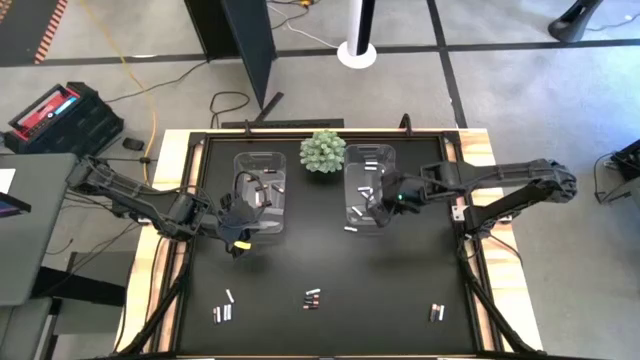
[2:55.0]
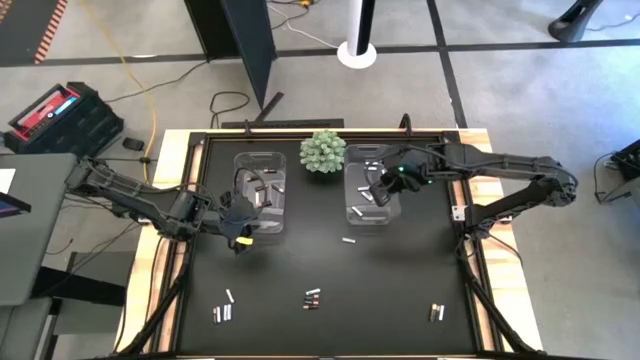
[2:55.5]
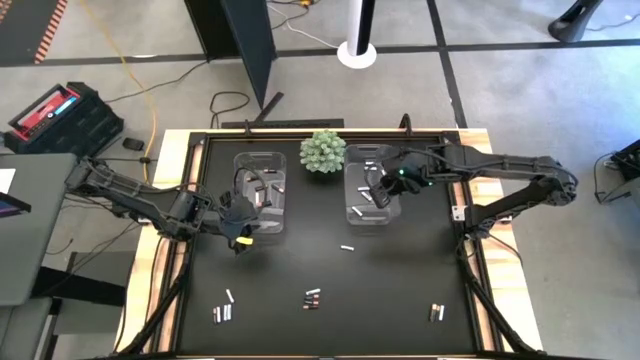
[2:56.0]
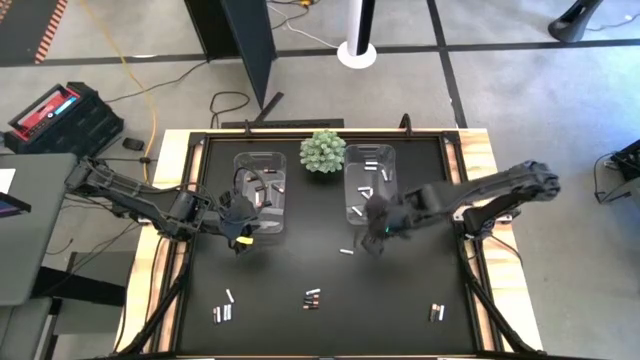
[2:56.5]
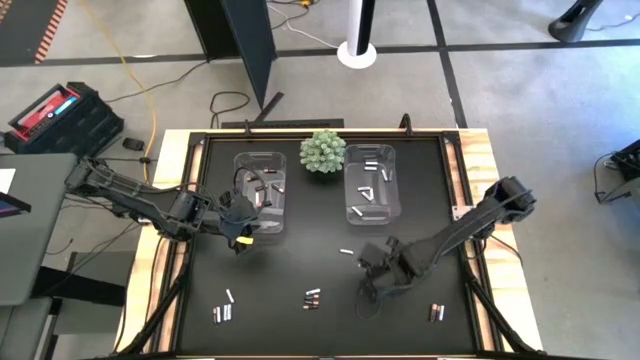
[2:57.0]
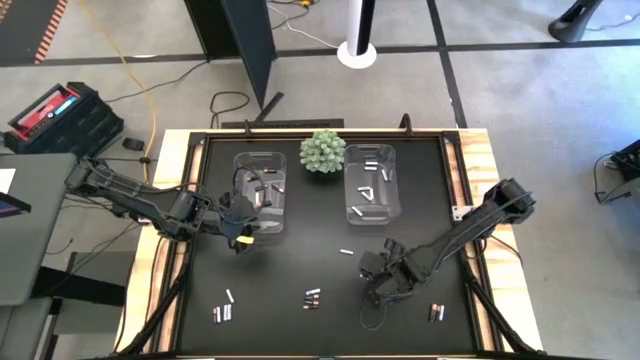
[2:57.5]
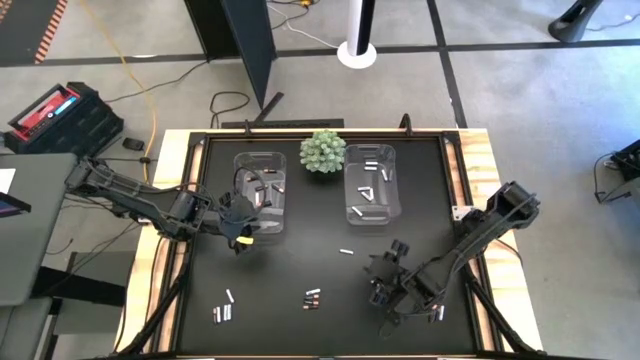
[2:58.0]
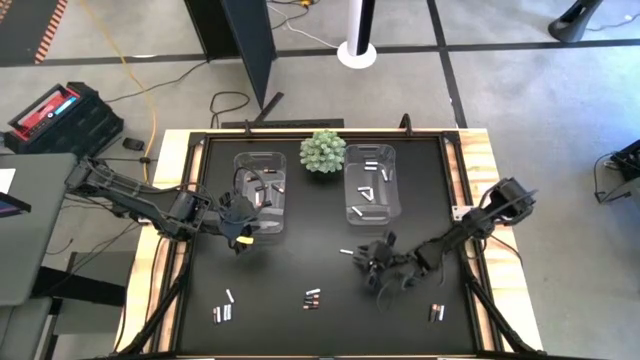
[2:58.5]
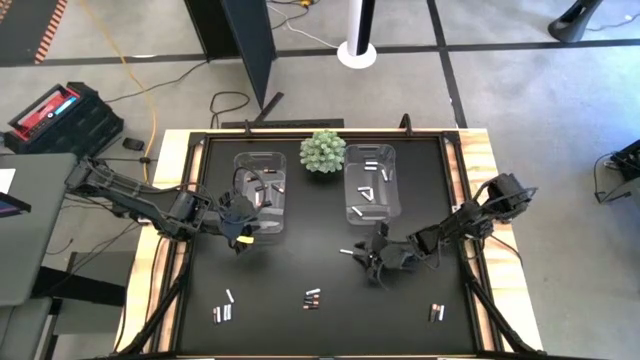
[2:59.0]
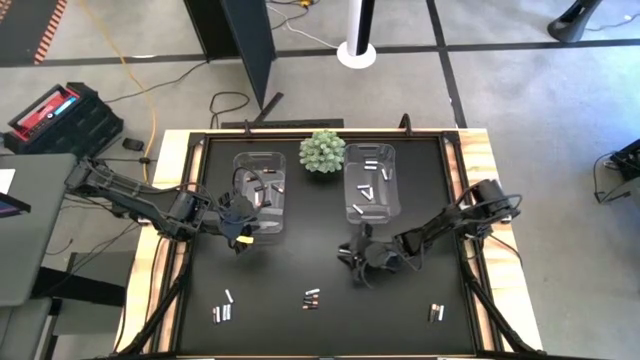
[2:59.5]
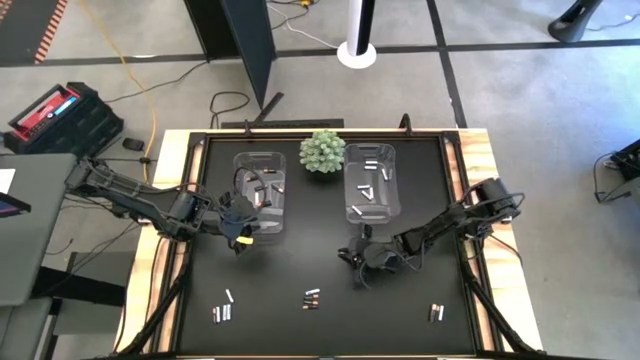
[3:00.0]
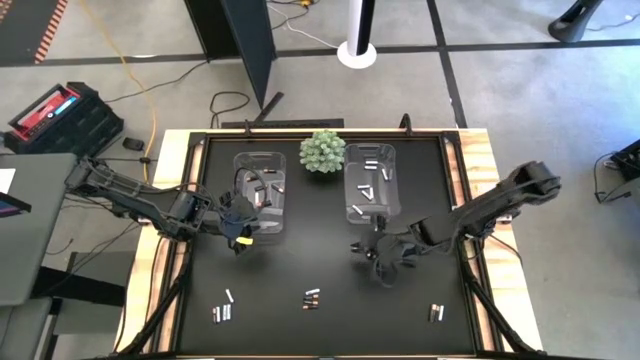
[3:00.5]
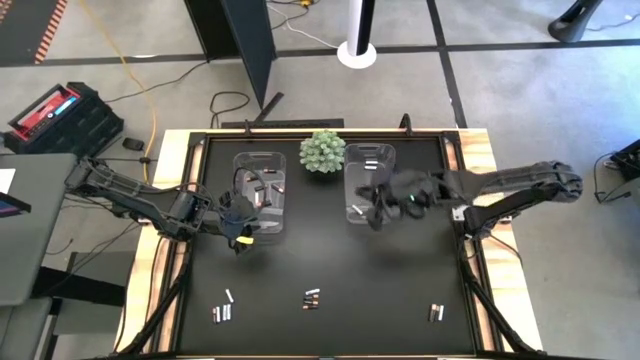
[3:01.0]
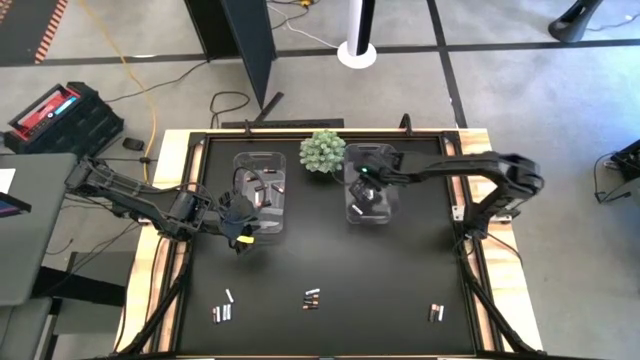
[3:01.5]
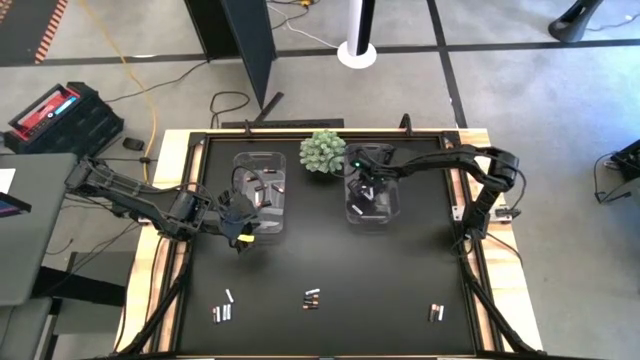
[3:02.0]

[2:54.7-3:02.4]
Task: Sort batteries
Put the white-blue battery into the right transparent bin

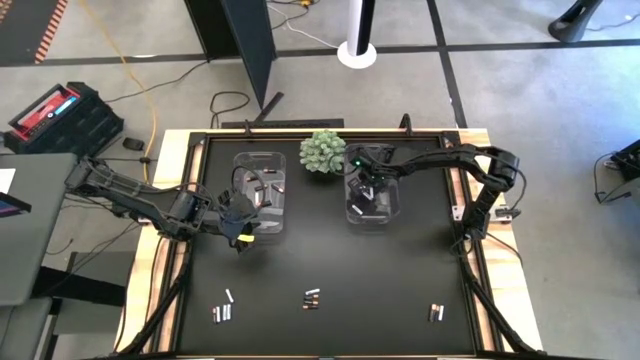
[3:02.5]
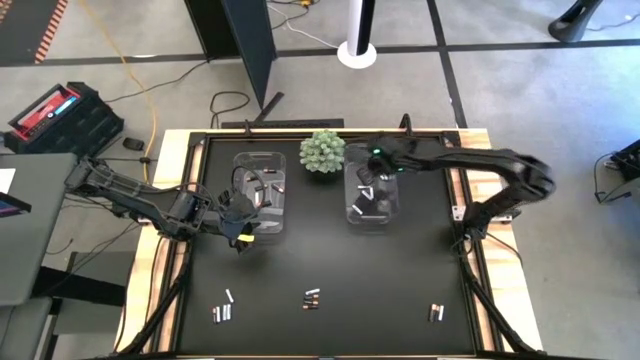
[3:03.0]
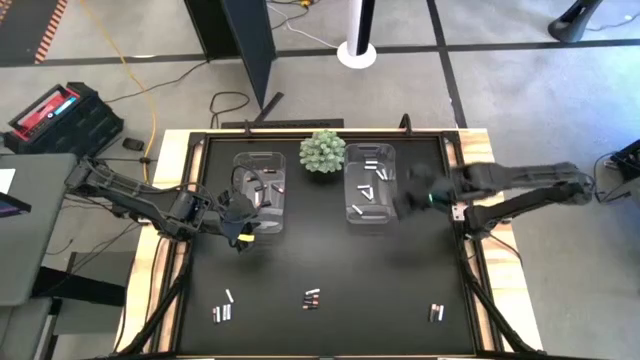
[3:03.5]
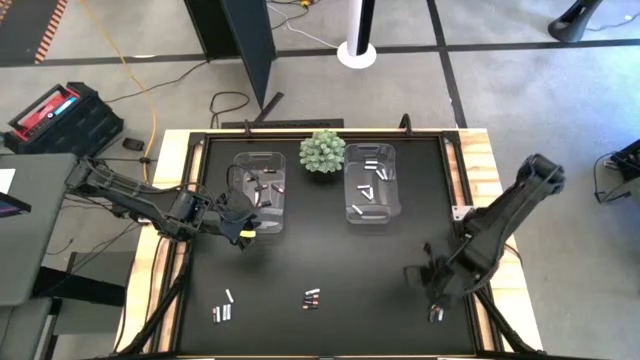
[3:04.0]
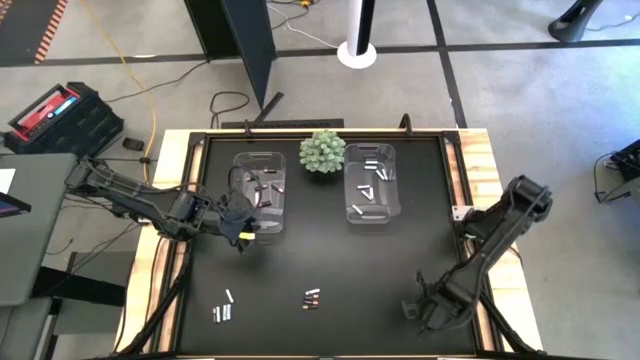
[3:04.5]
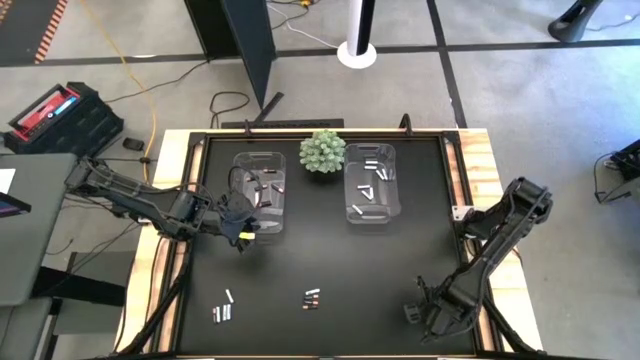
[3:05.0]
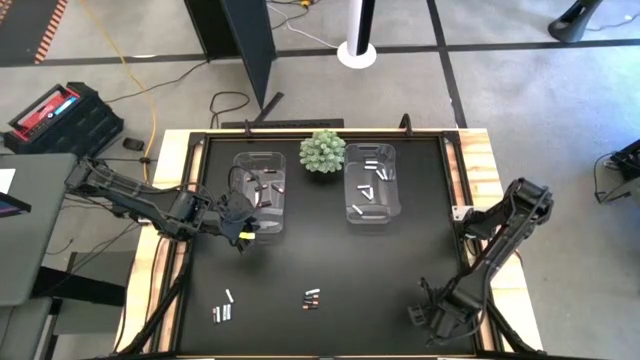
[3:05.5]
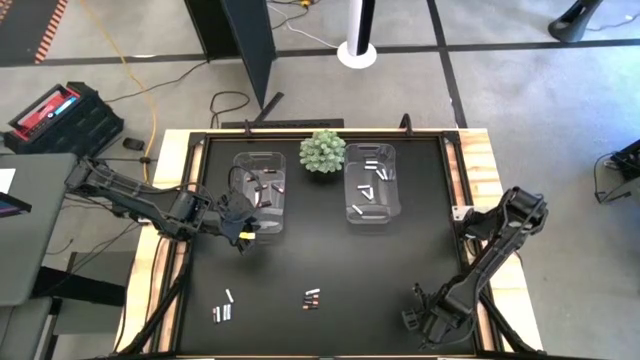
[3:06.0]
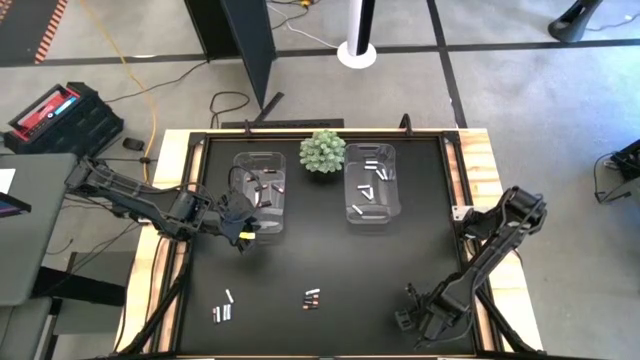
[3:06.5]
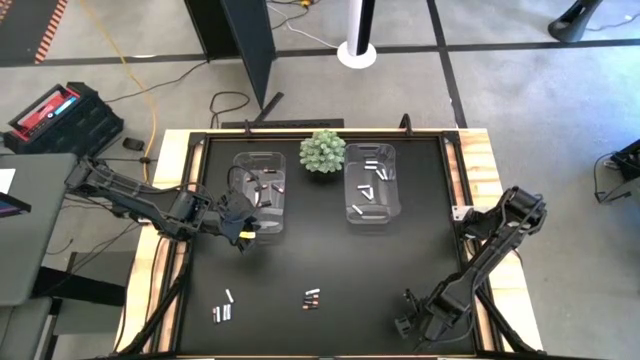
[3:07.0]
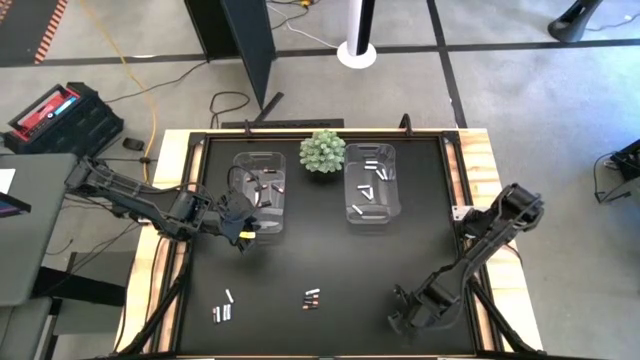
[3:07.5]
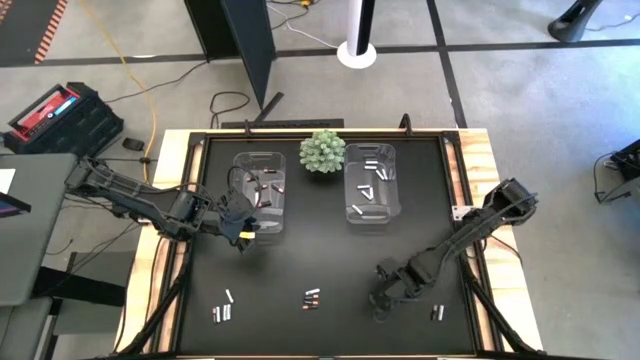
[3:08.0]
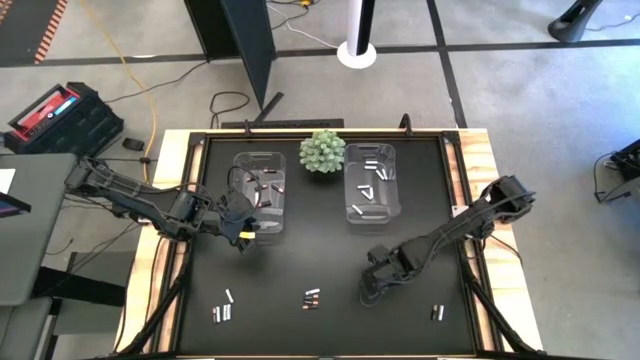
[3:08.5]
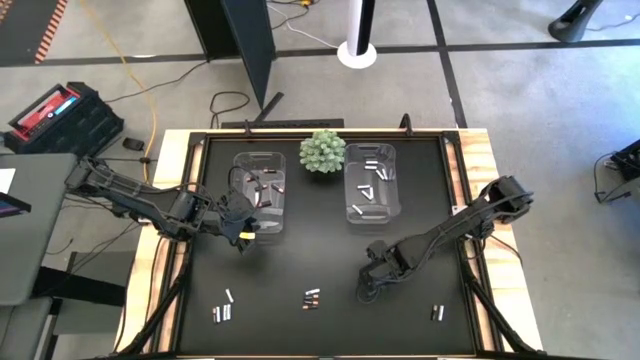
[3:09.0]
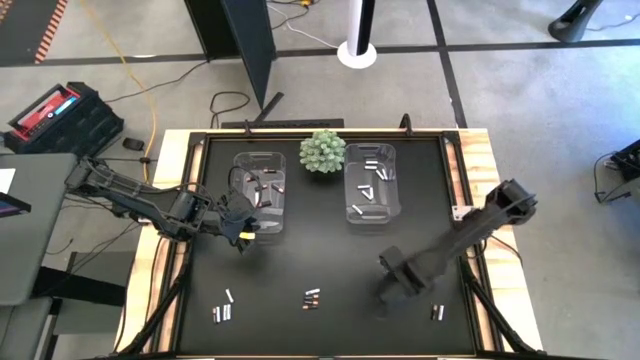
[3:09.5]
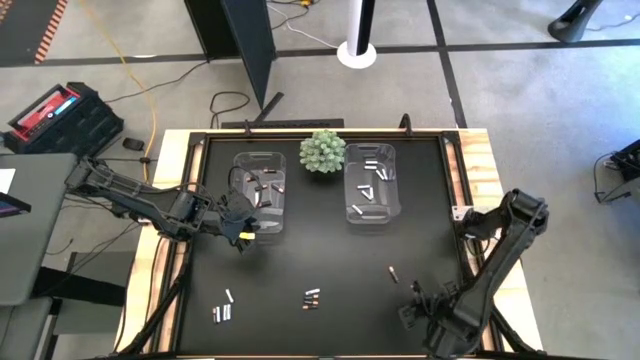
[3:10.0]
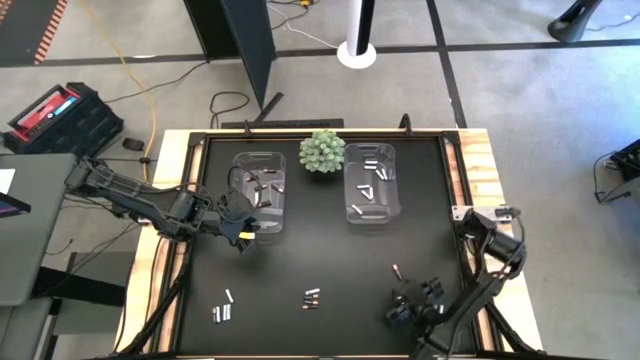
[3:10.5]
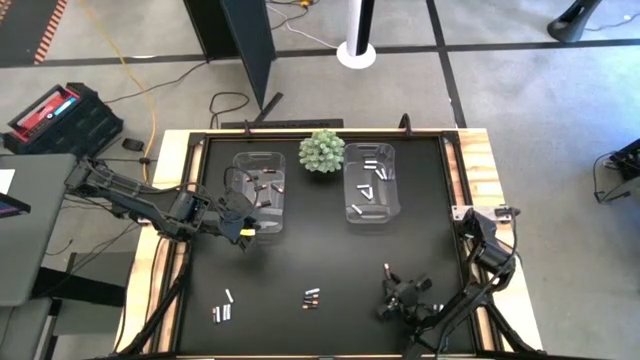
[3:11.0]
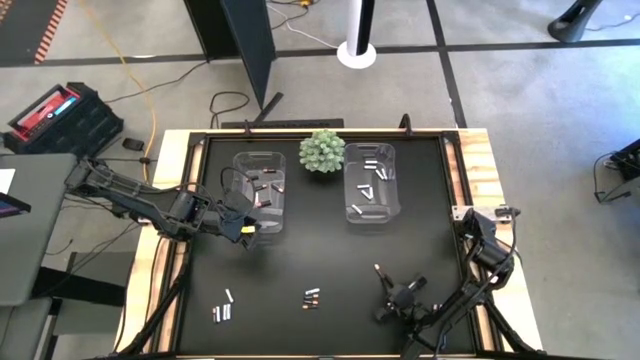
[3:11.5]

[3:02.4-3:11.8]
Put the black-brown battery into the left transparent bin

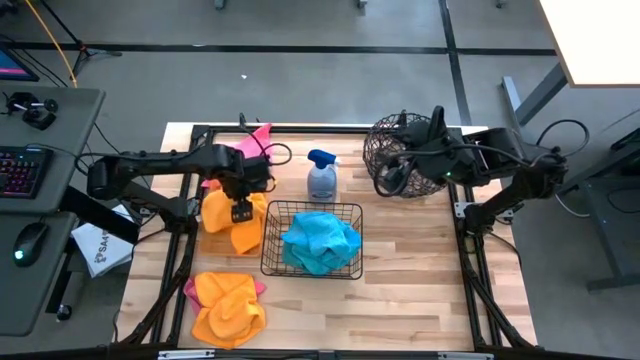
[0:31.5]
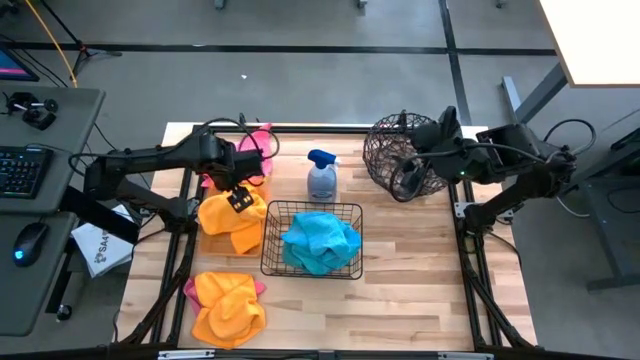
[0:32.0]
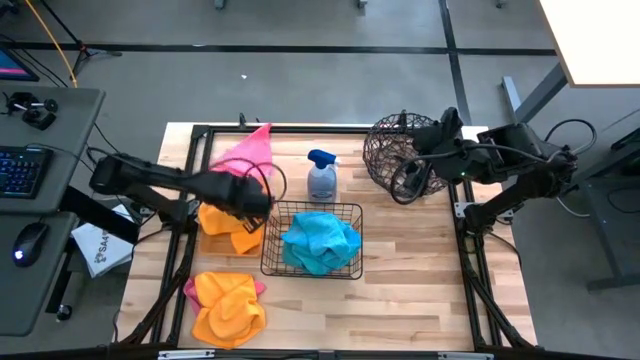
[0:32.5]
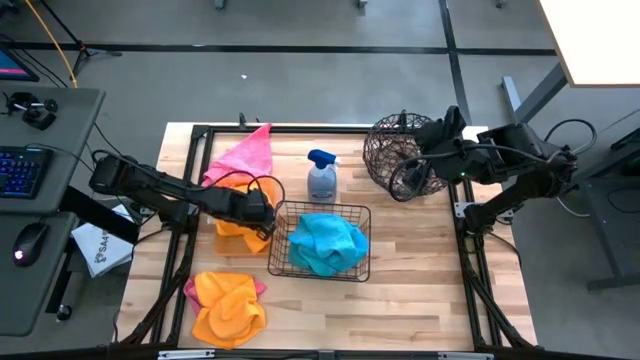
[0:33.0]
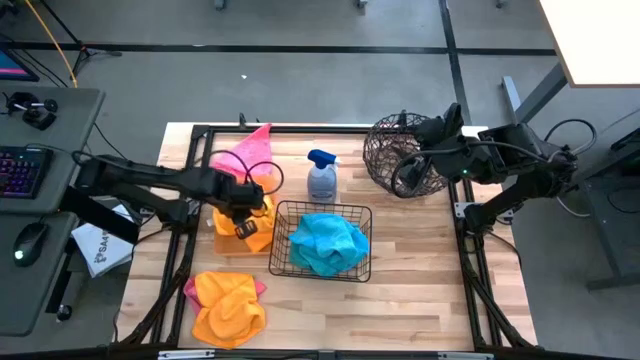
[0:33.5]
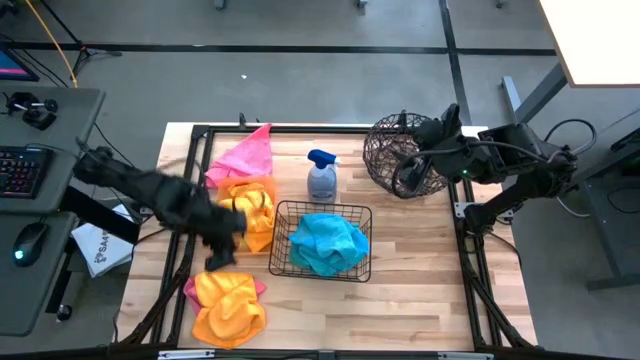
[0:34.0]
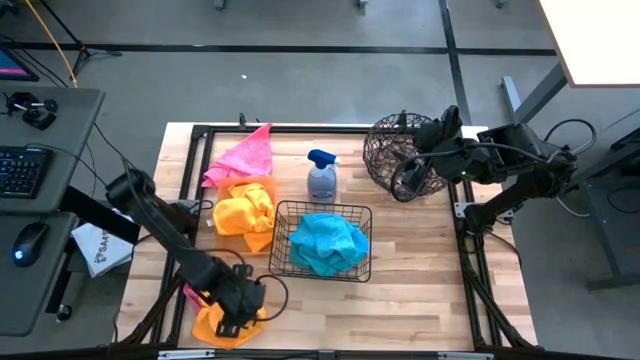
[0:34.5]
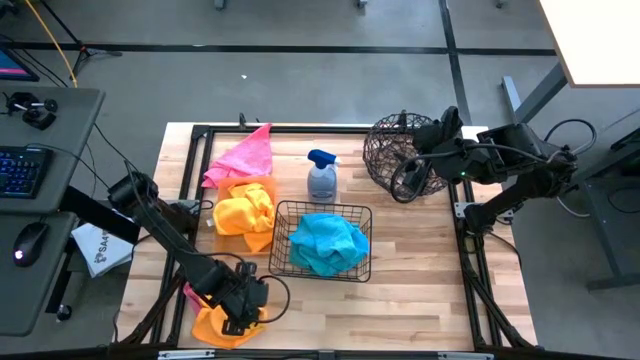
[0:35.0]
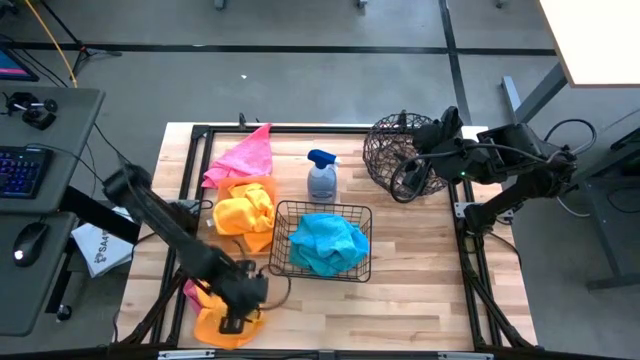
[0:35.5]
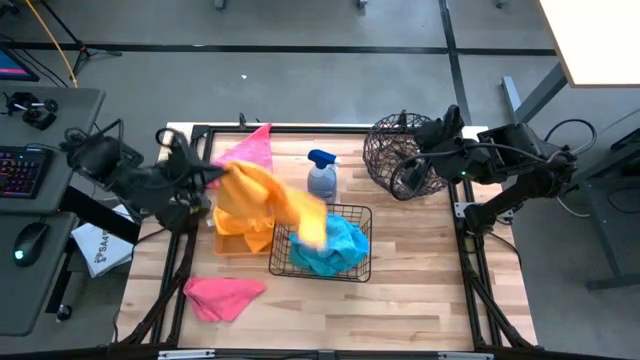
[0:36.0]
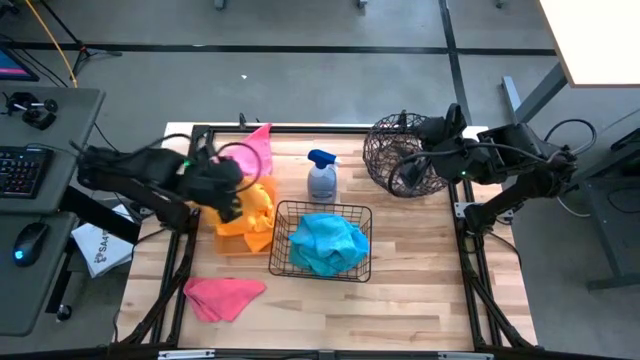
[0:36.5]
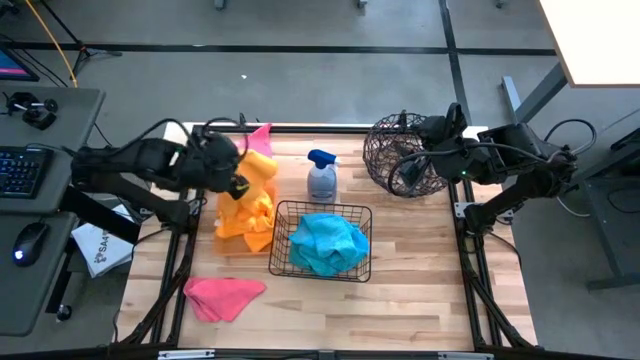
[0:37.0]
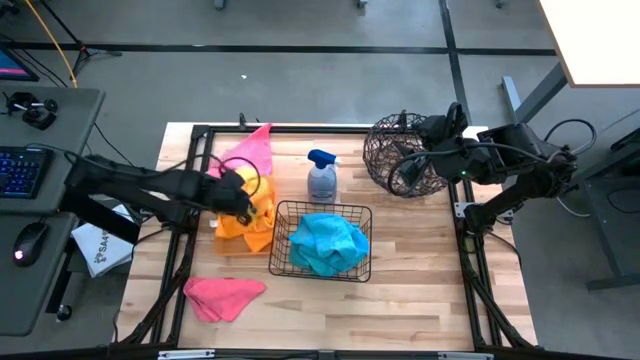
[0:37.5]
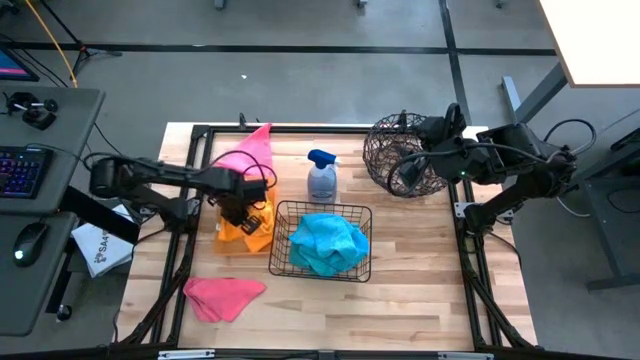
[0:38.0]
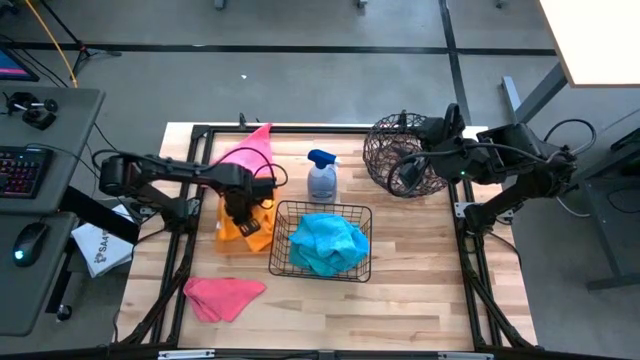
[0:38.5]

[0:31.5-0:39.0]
Task: Sort microfiber towel by color & place in baskets
Put the yellow towel into the orange bin
